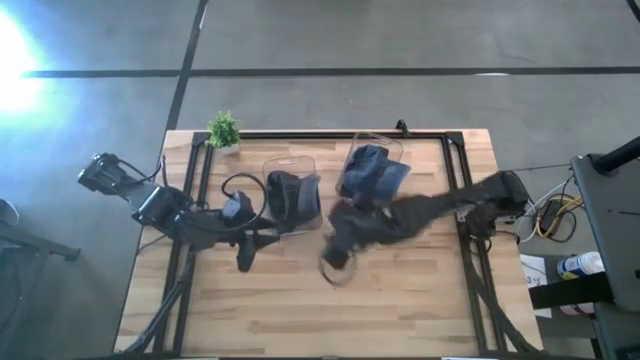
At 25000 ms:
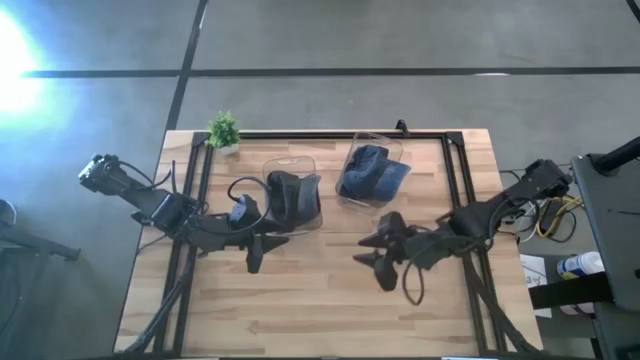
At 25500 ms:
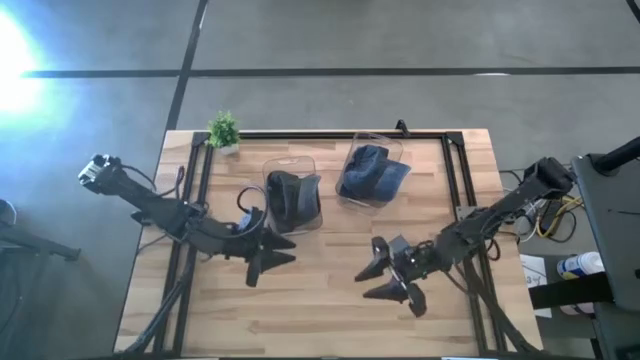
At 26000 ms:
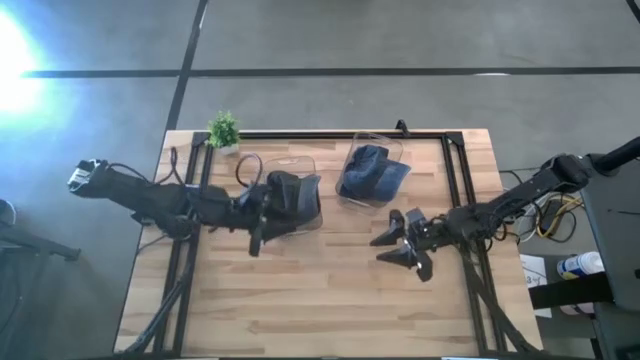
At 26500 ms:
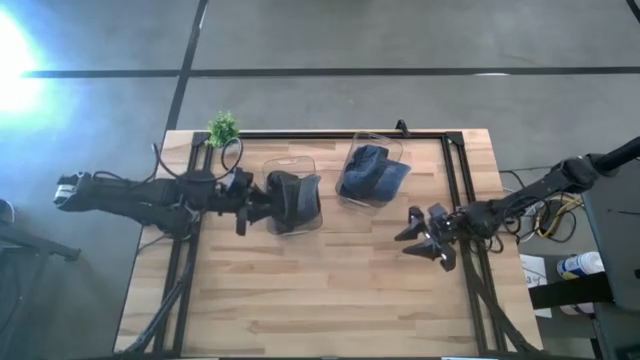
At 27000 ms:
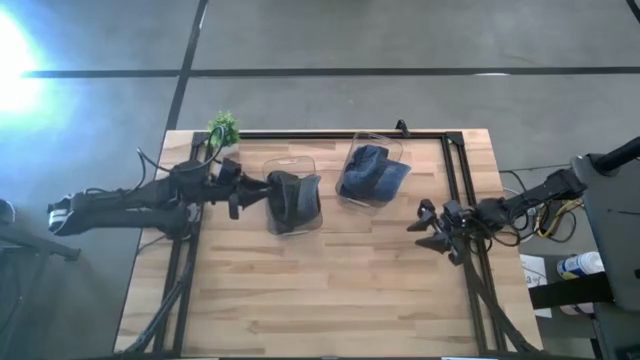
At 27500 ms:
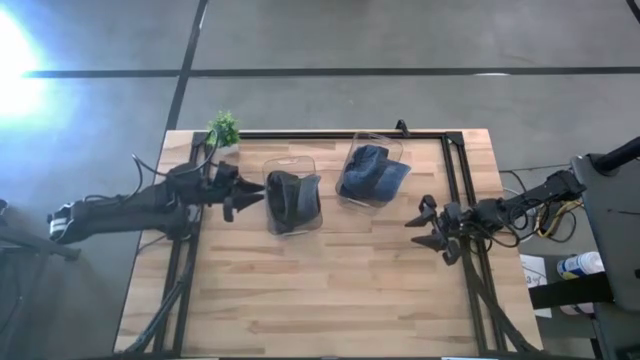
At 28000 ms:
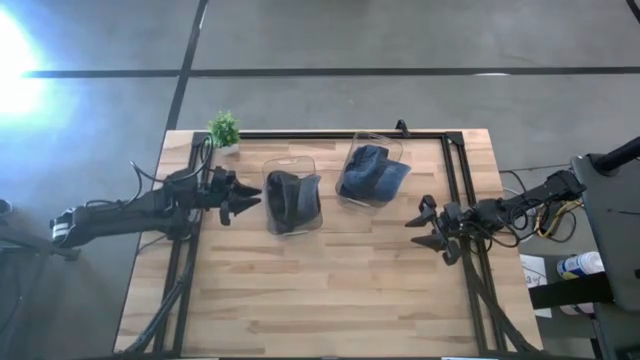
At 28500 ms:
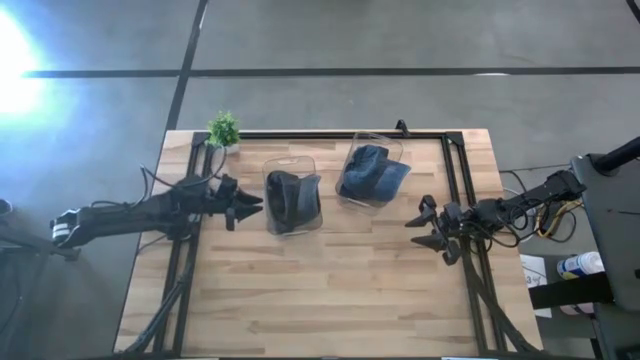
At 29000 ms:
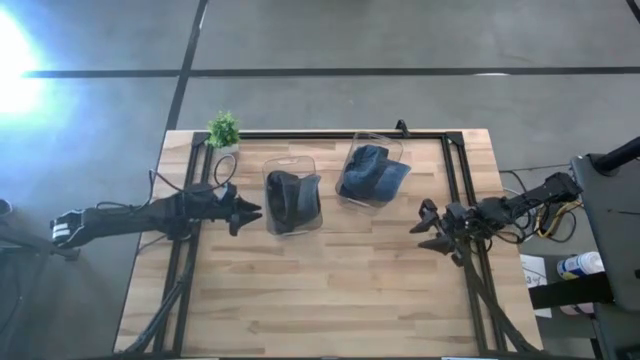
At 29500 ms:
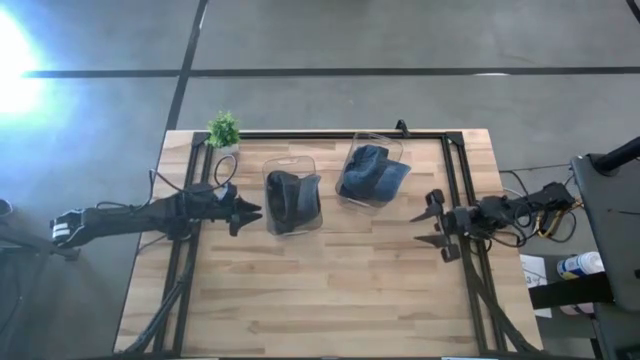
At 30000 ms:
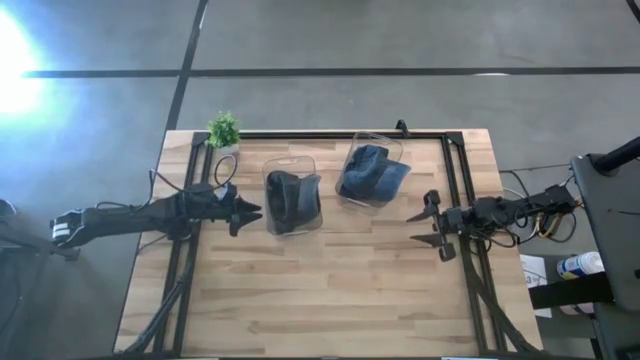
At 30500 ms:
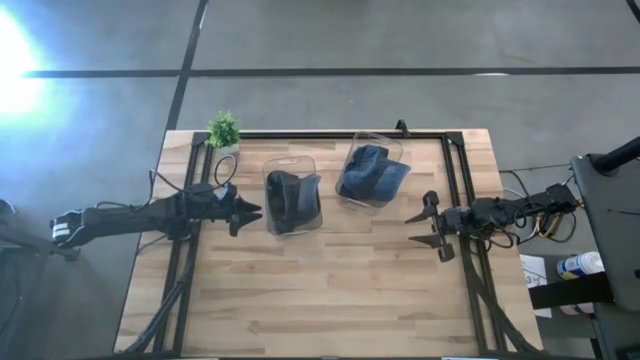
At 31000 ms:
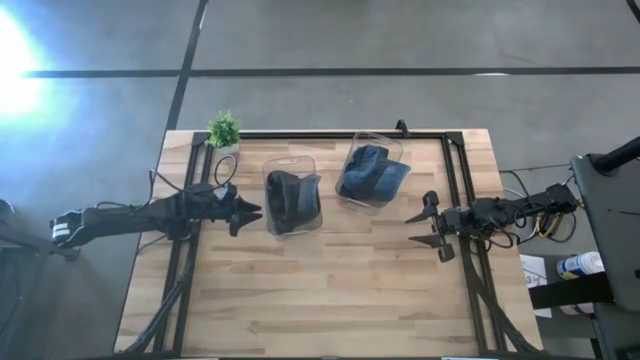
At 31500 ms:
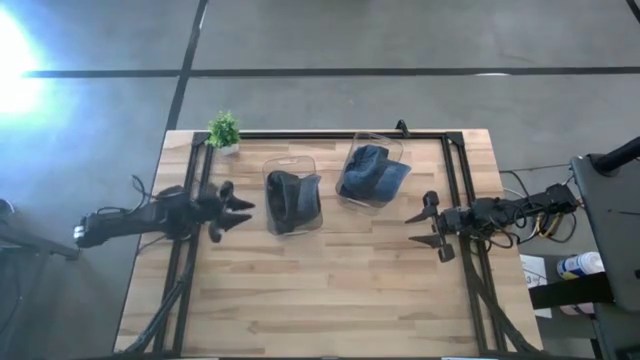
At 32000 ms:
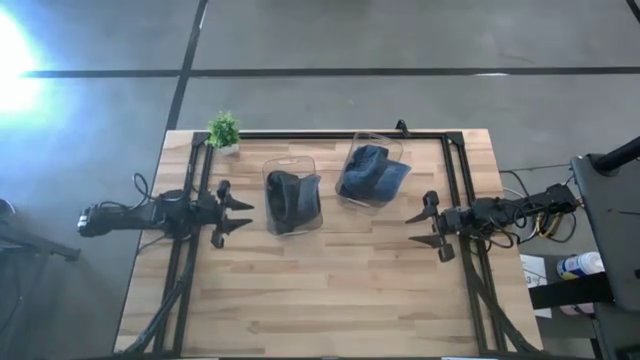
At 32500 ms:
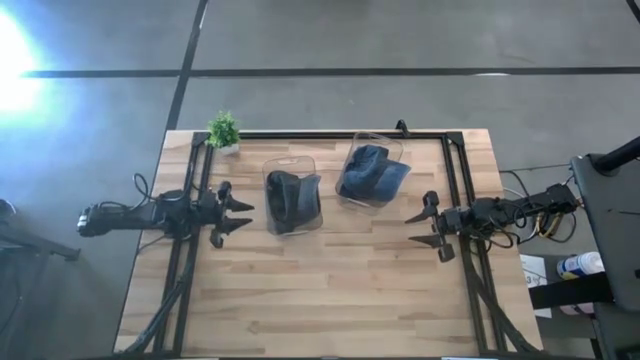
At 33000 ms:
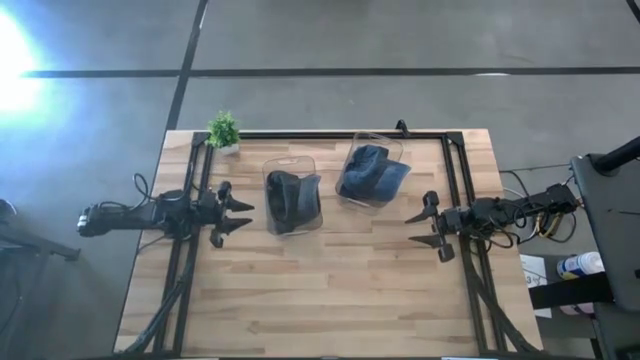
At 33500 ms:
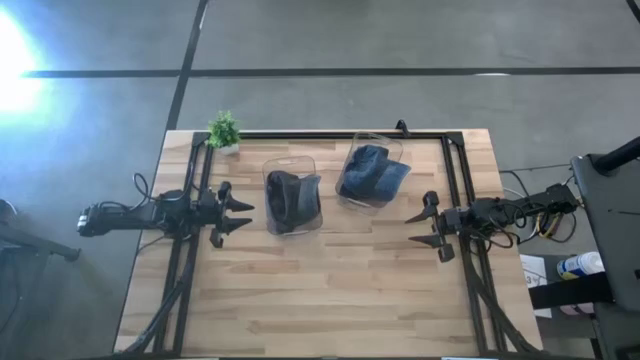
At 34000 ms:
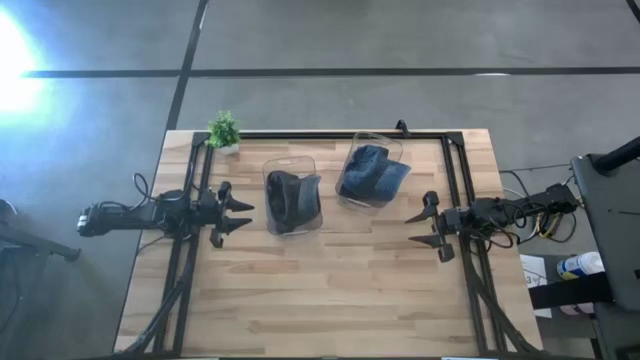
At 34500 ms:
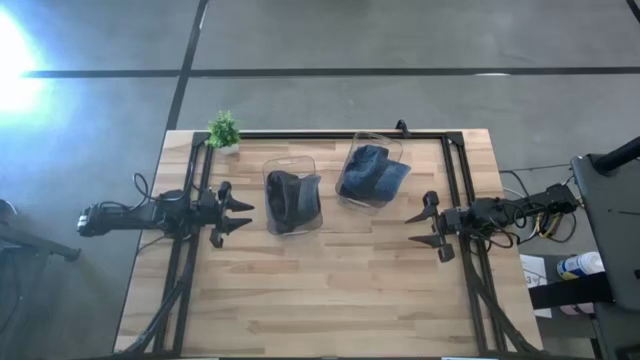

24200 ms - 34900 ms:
Task: Pick & Place hat
Return to Home Position

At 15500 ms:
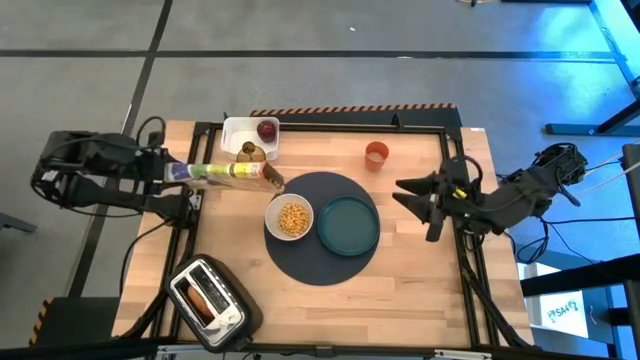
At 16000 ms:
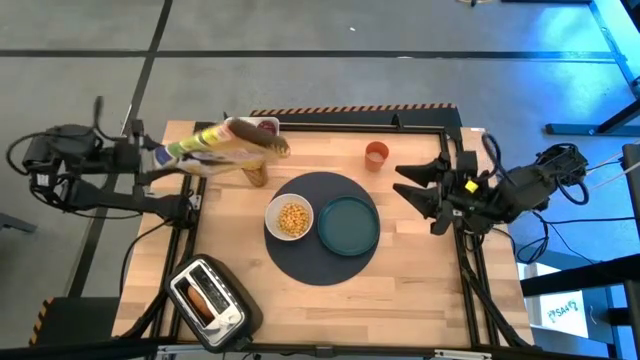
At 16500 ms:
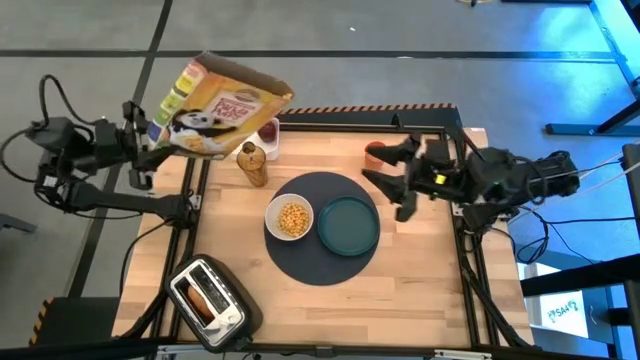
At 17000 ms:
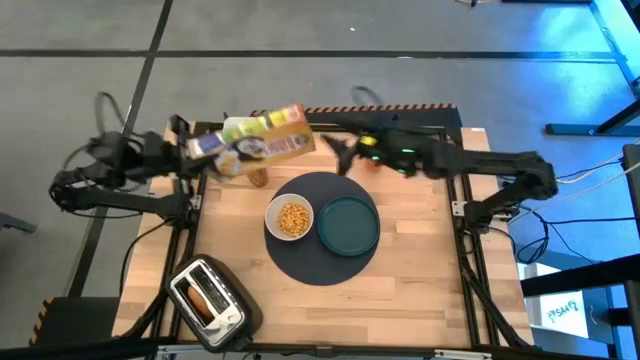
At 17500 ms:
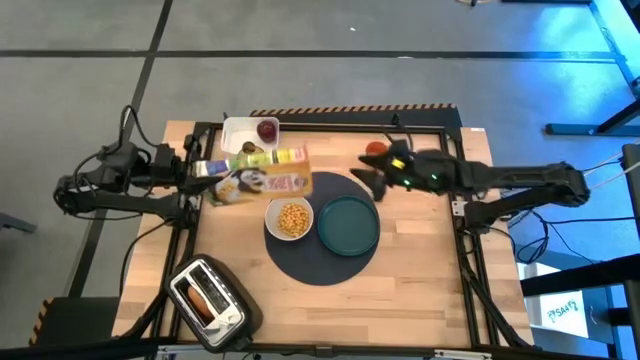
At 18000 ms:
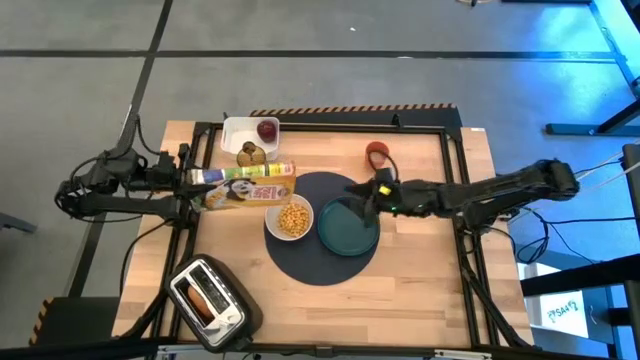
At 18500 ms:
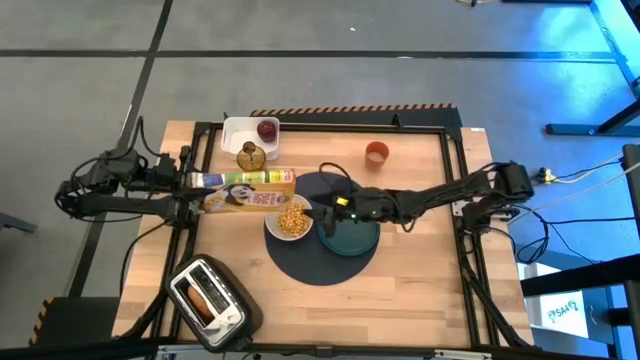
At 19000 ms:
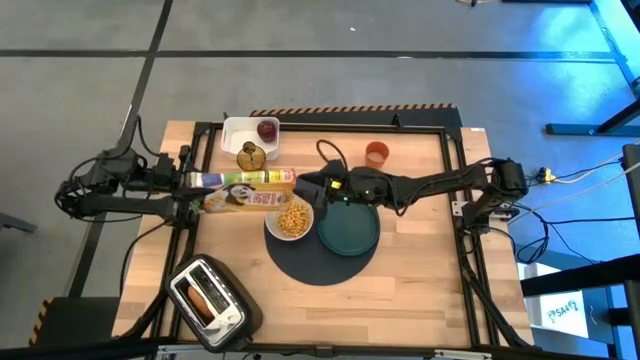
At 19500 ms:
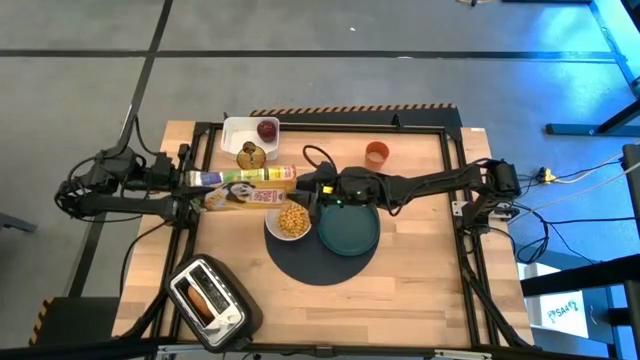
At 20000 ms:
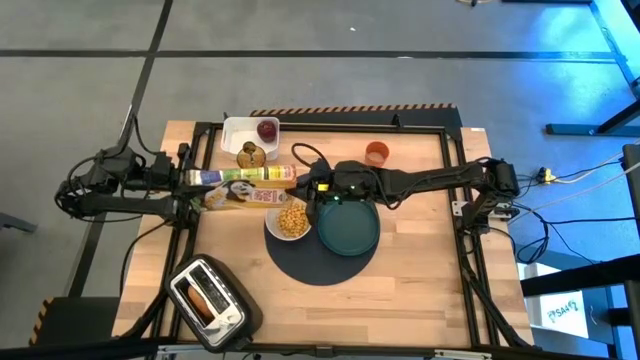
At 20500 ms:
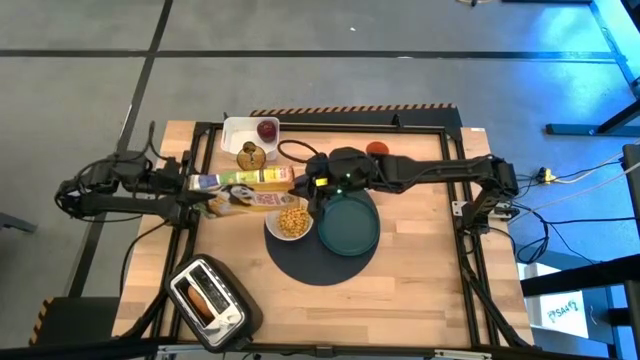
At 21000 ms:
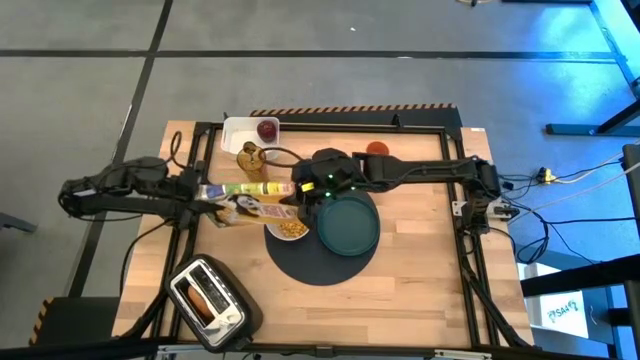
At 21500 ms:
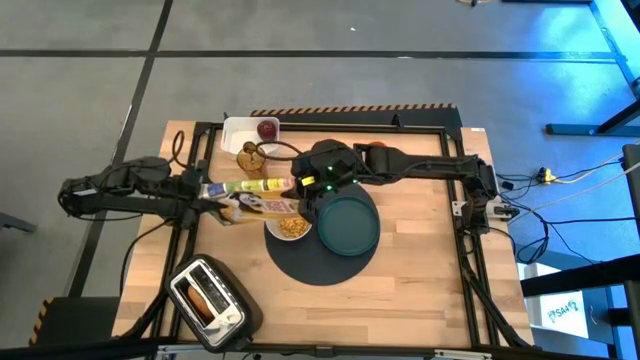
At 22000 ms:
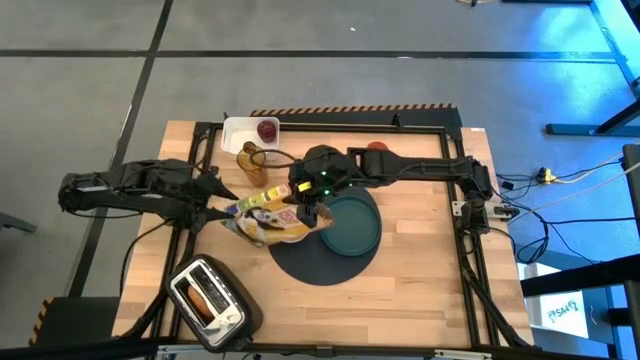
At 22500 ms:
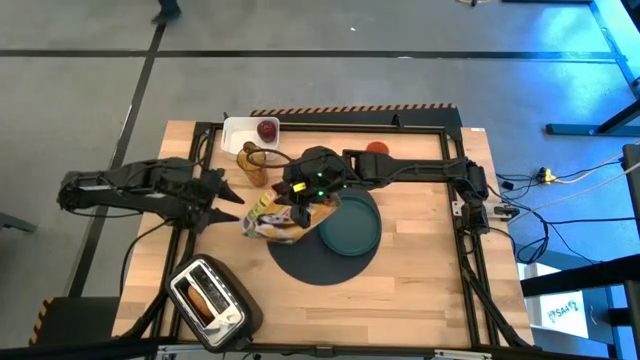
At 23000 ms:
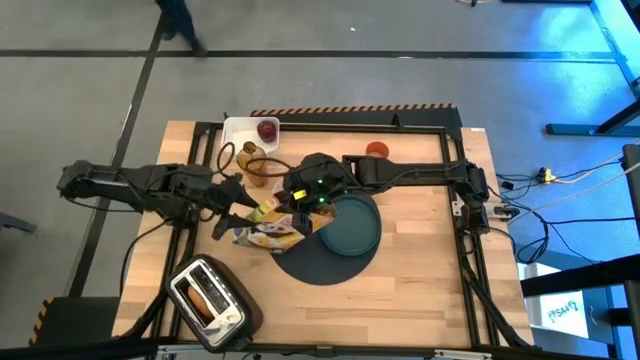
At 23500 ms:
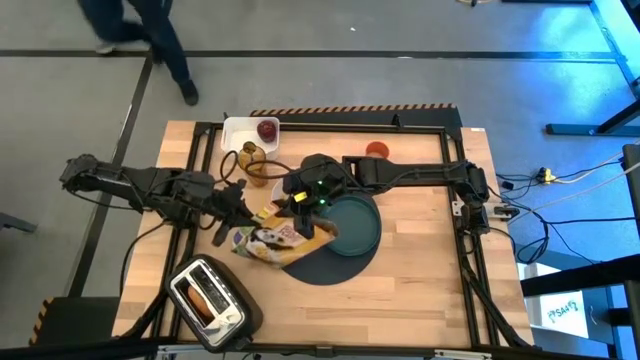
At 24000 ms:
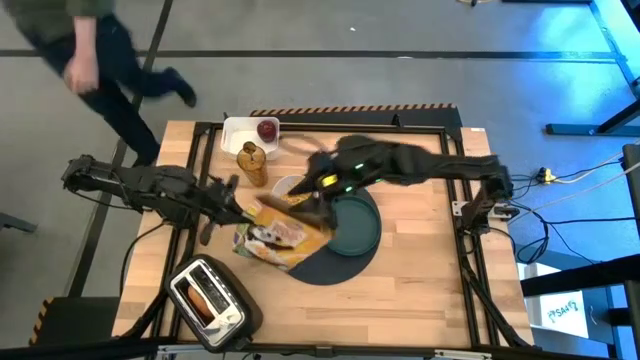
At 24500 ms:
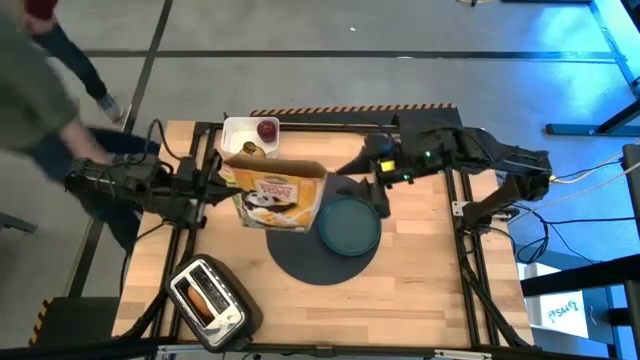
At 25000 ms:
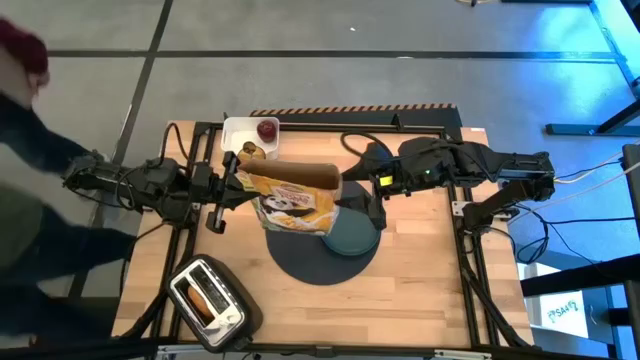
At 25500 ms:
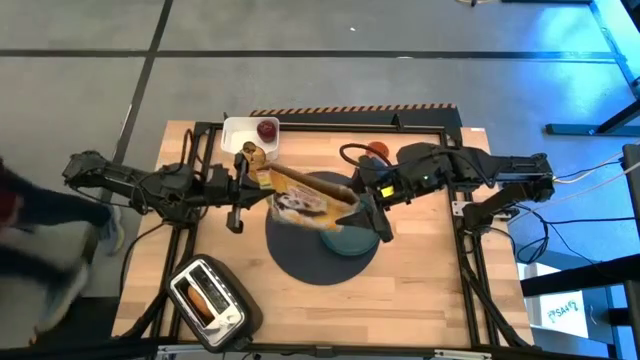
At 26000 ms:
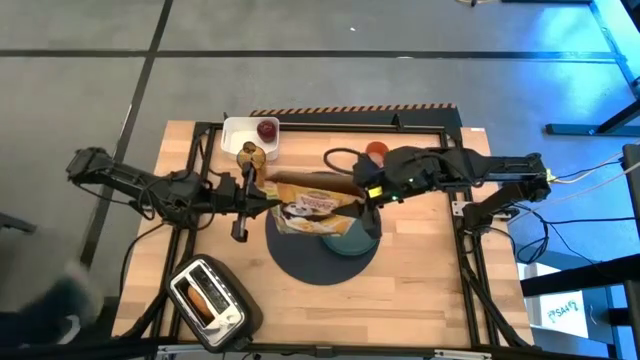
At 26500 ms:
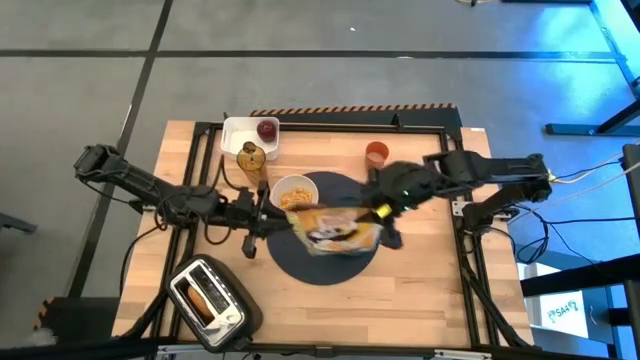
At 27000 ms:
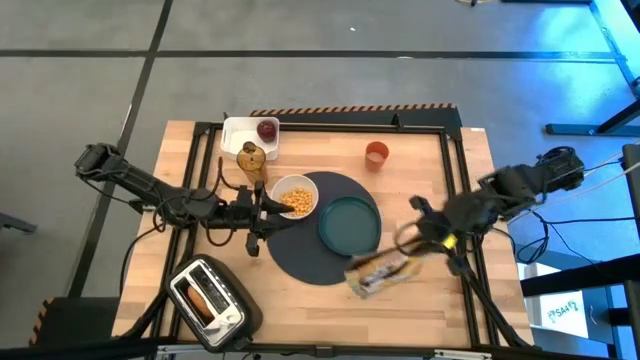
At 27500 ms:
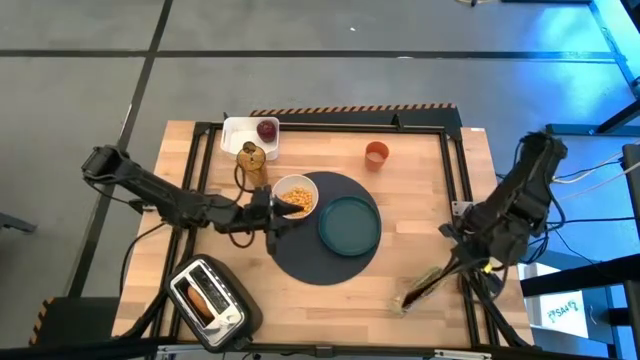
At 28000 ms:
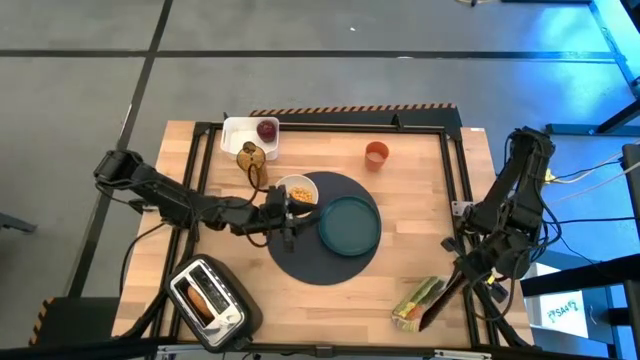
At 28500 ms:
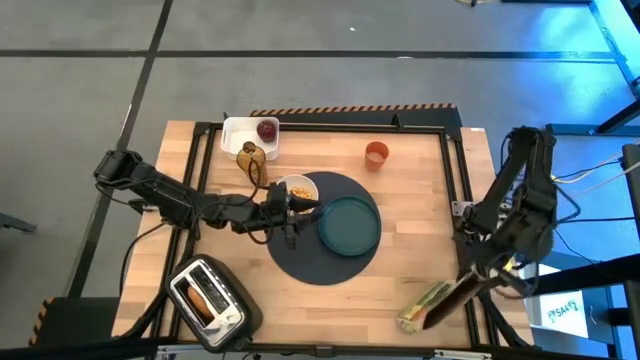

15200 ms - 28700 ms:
Task: Arrange a breakfast setting
Pour the cereal from the orange cereal box into the white bowl
